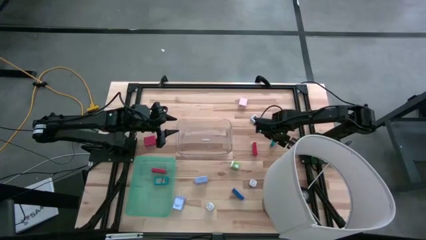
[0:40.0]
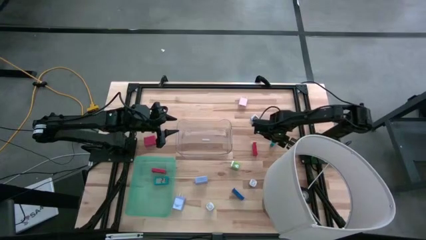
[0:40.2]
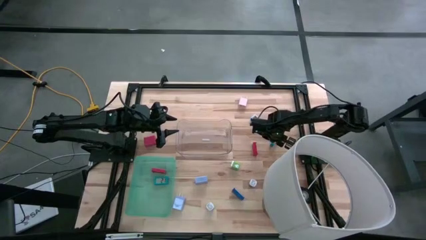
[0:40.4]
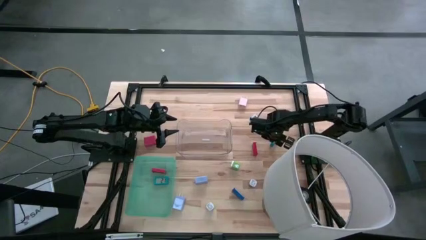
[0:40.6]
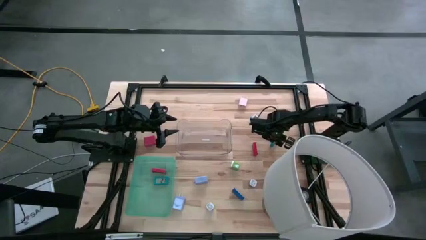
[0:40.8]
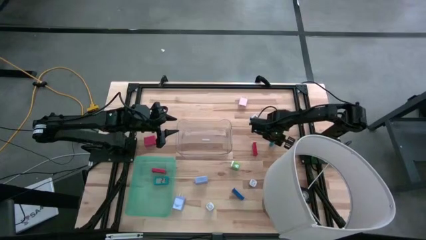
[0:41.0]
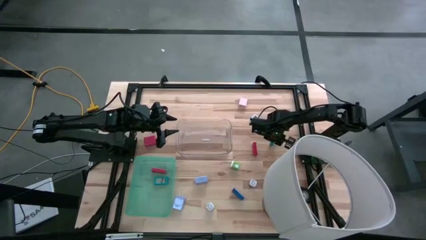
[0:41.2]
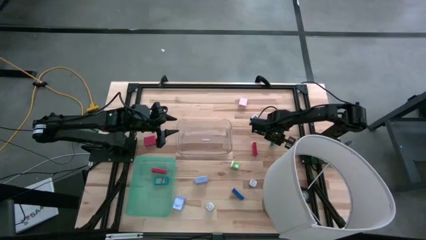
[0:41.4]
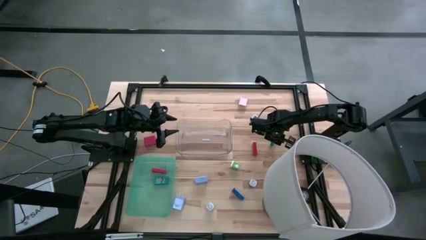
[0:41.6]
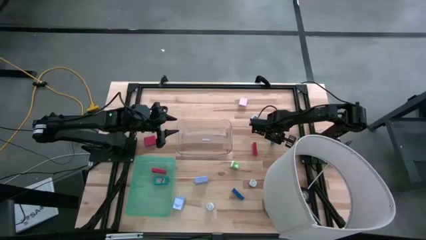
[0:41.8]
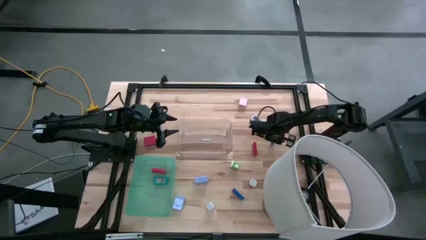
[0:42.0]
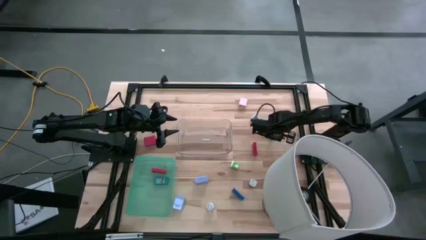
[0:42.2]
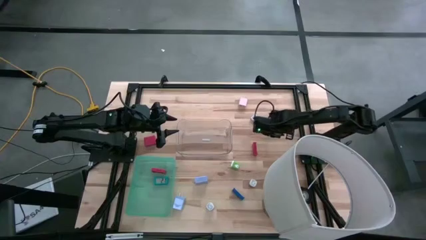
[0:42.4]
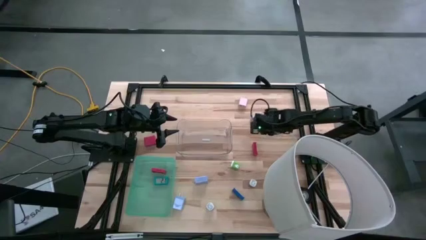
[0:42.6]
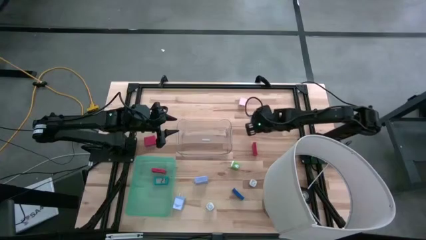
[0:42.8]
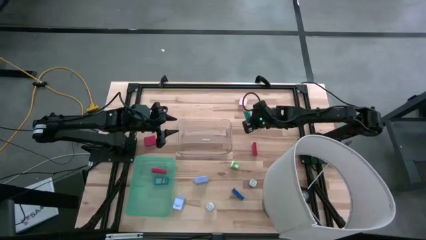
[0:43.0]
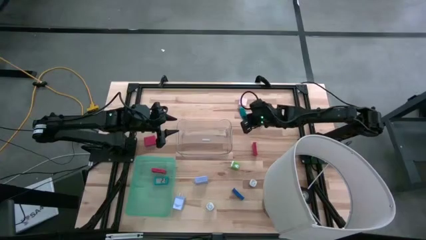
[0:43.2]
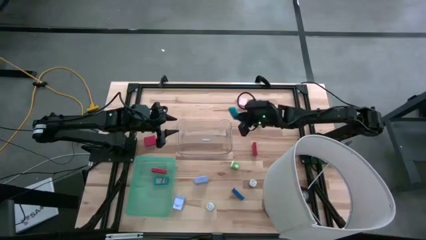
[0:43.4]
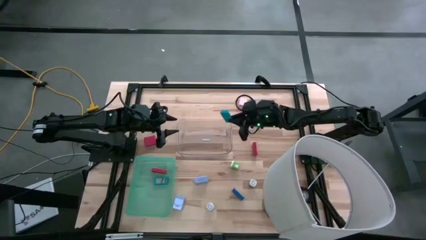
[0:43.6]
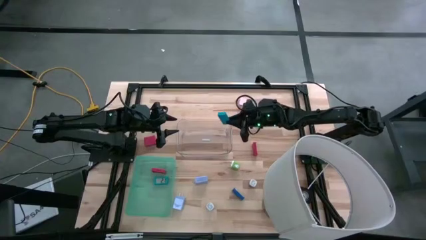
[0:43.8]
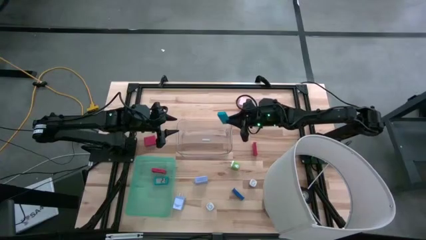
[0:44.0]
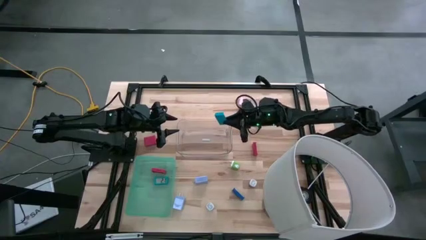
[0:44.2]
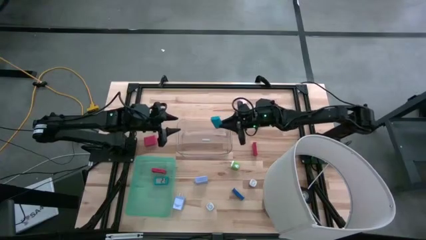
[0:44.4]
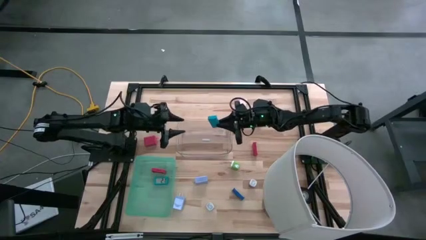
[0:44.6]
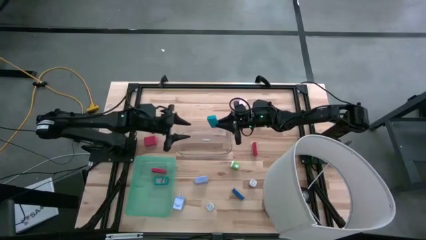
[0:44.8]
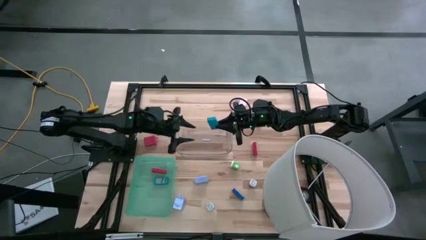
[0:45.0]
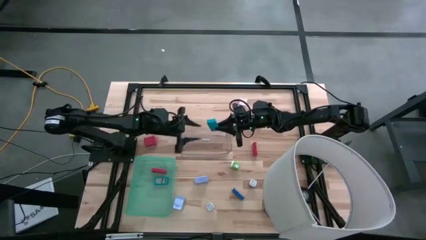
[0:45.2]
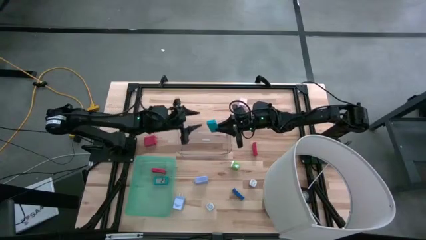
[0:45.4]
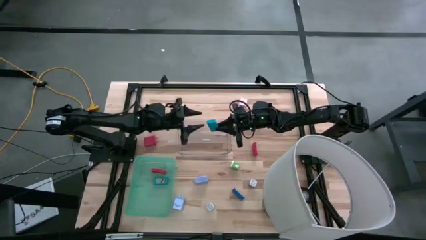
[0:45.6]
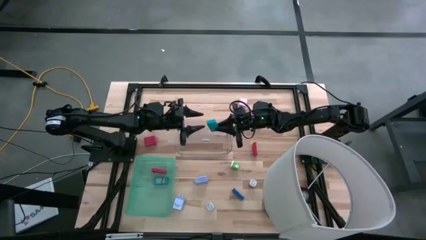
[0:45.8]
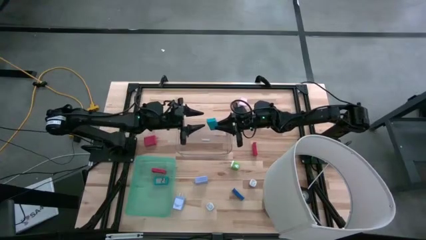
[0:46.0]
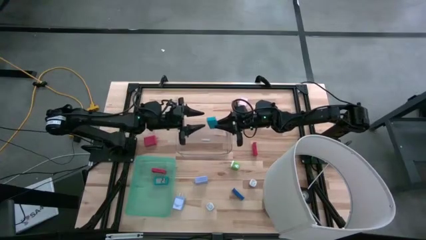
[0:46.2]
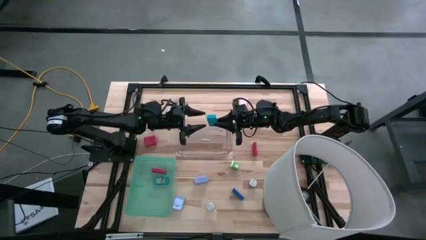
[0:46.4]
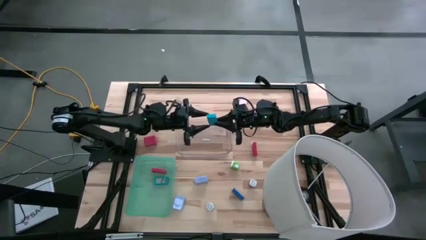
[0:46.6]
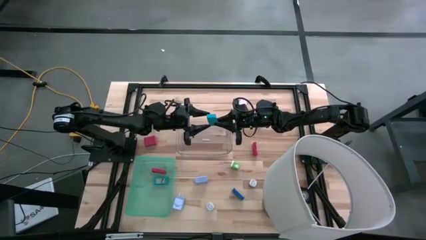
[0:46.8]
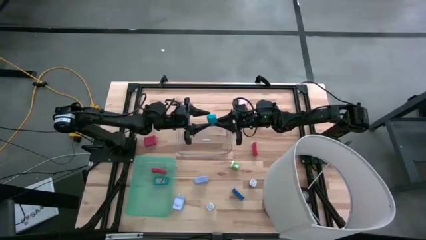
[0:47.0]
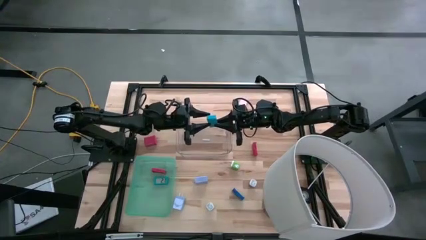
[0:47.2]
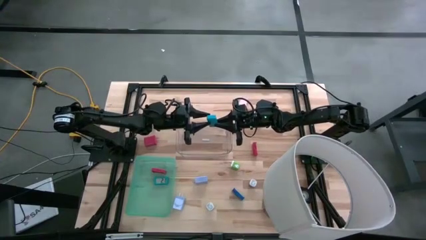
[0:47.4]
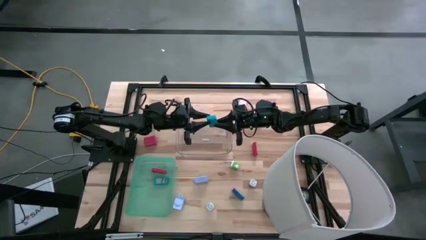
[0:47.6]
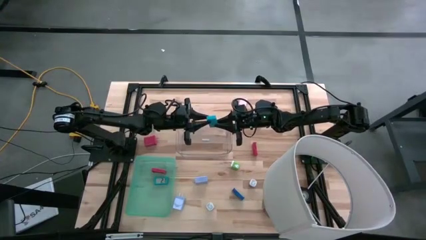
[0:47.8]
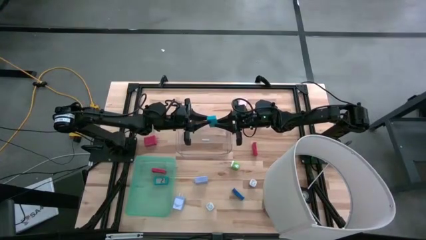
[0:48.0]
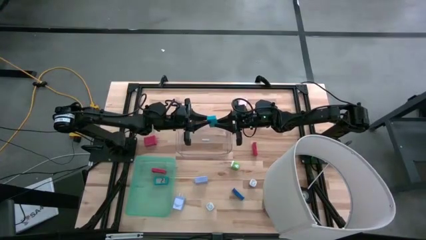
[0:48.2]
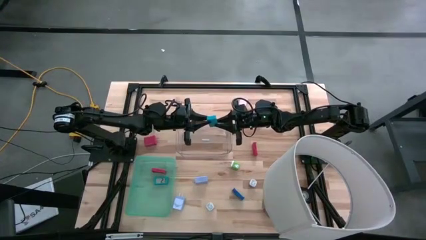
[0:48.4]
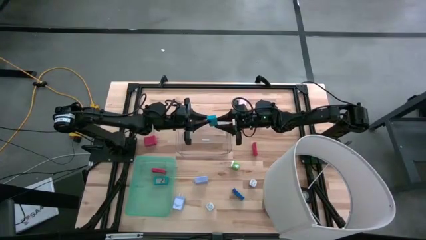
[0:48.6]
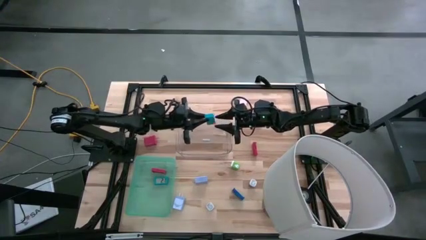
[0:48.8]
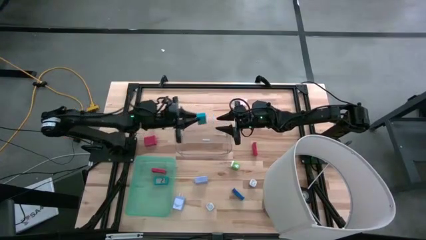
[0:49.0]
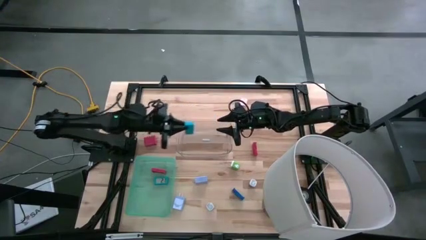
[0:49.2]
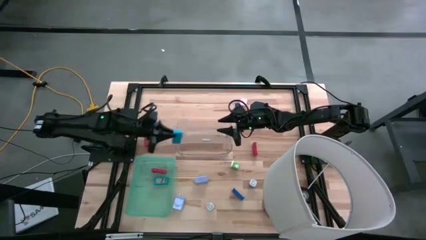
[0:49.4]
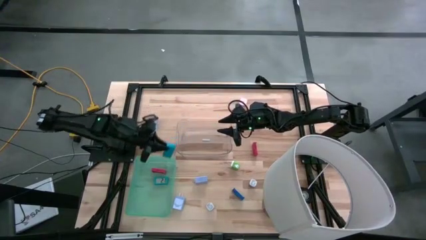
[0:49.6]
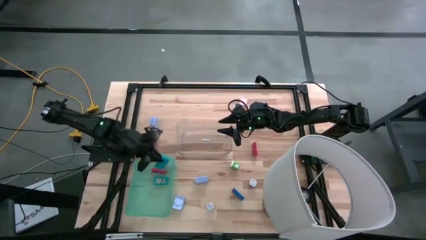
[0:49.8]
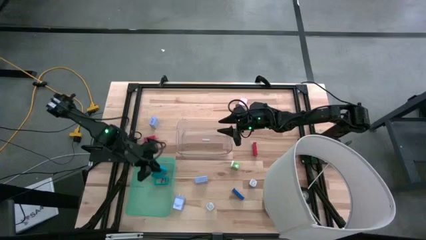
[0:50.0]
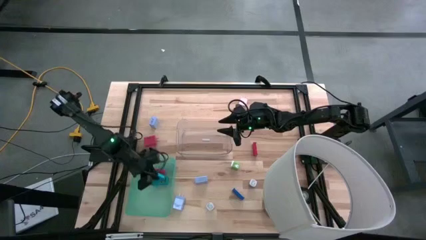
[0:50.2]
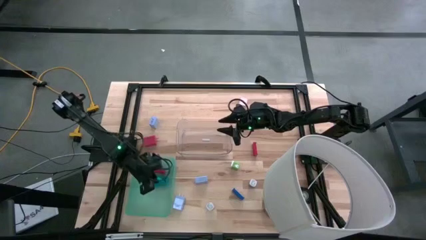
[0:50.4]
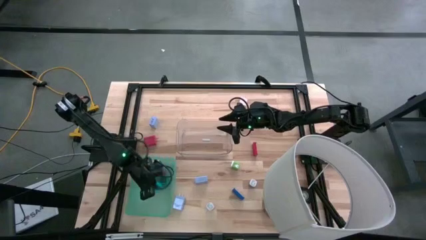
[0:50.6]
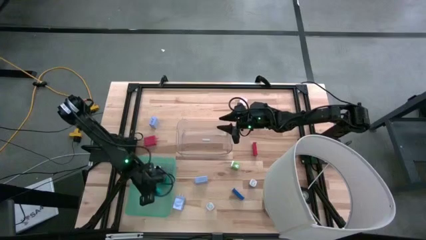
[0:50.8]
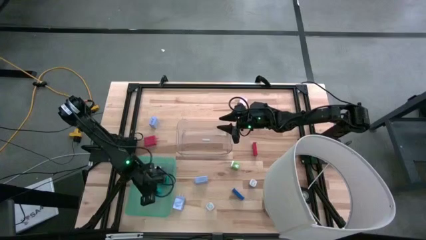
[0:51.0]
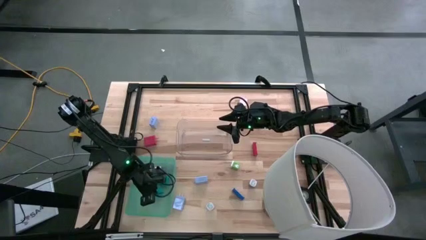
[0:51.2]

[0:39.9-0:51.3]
Task: Pick & Place Office items
Put the light blue digital clock into the green bin

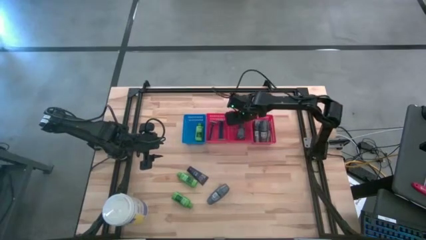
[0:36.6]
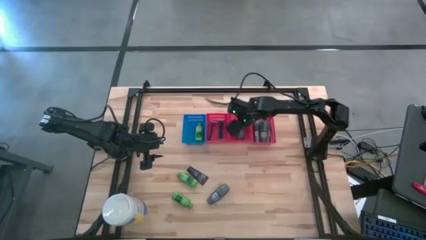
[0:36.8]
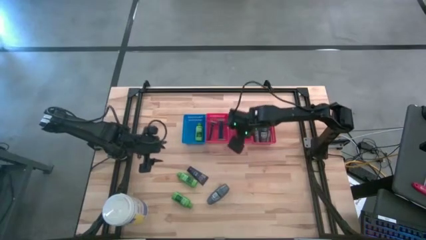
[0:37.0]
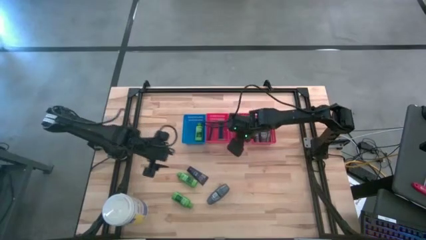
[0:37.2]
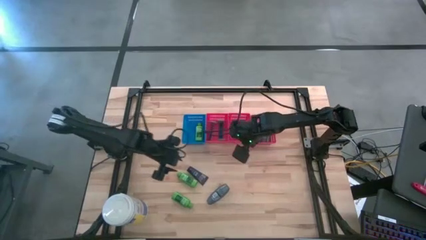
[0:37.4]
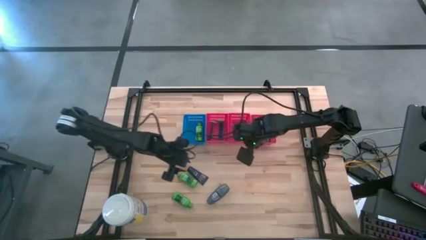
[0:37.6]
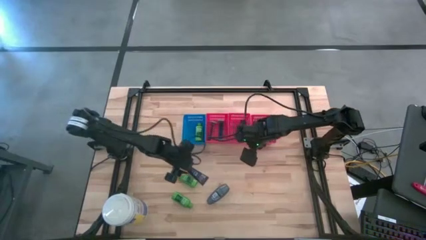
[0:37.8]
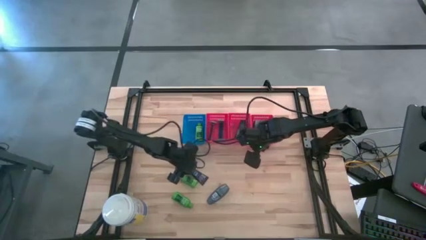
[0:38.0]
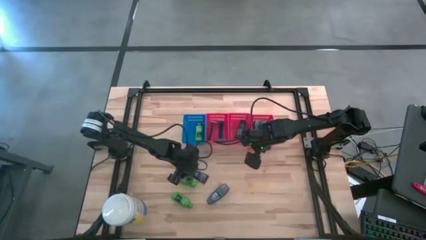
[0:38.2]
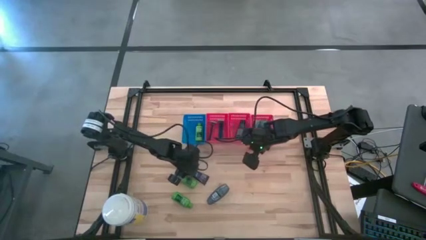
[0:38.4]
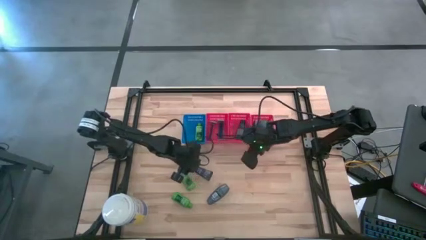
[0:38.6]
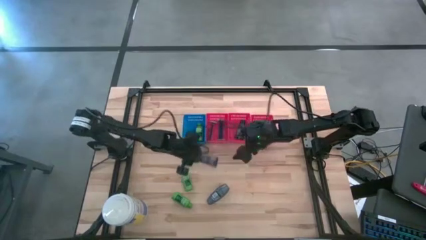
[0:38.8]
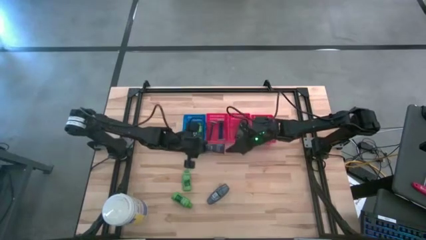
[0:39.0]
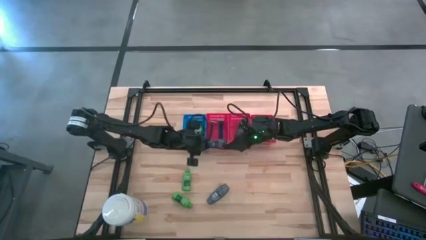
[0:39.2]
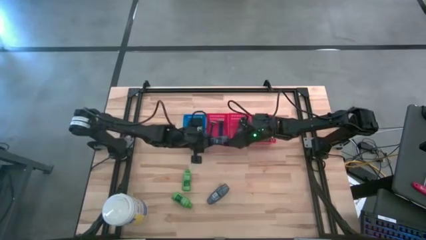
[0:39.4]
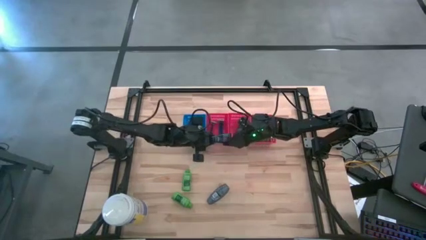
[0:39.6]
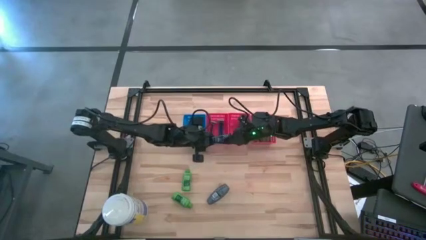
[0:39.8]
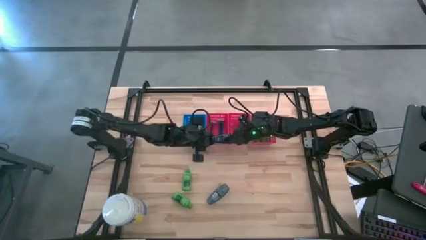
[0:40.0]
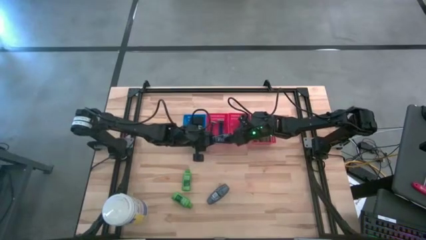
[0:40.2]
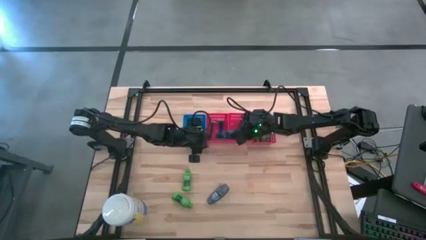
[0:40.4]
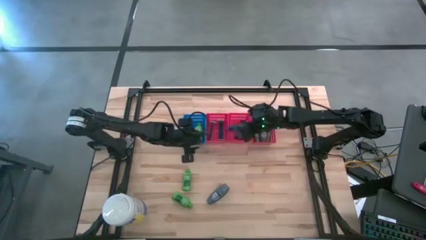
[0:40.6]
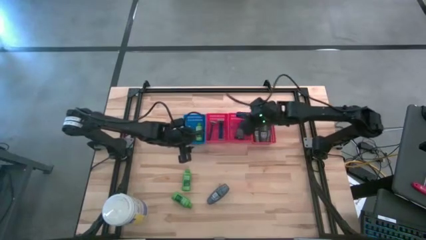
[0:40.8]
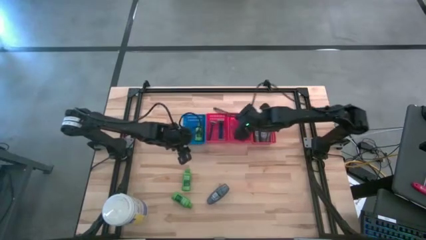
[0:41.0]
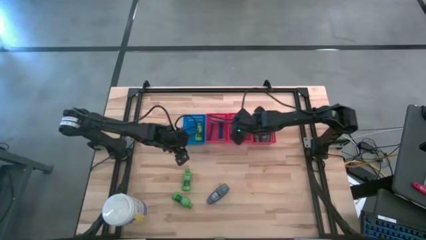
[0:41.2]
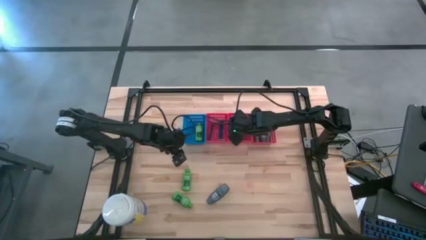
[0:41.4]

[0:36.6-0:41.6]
Task: Pick & Place Travel size toiletries
Put the black shave cream into the middle red bin

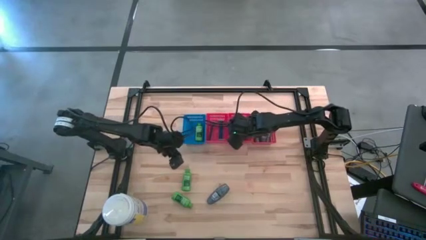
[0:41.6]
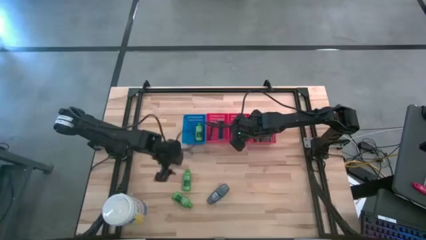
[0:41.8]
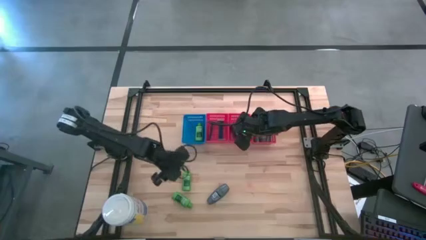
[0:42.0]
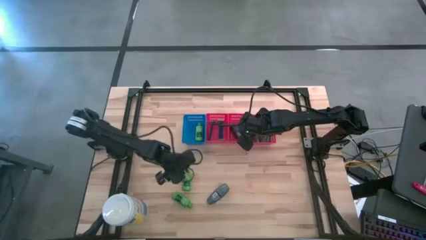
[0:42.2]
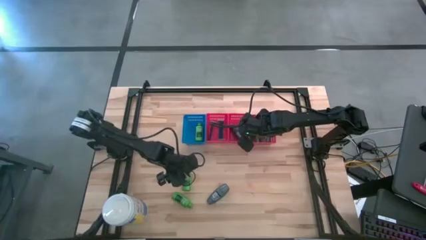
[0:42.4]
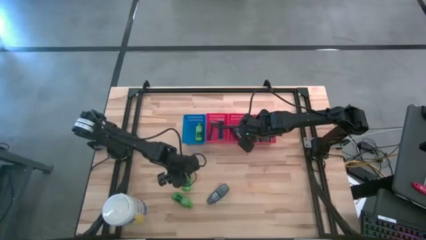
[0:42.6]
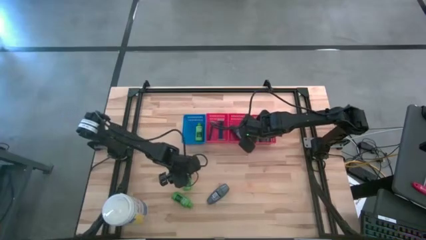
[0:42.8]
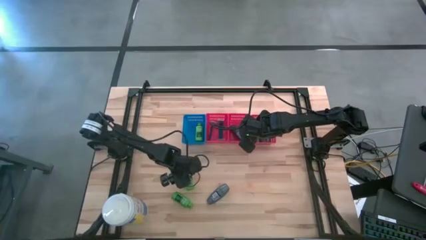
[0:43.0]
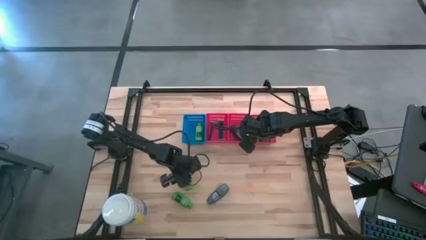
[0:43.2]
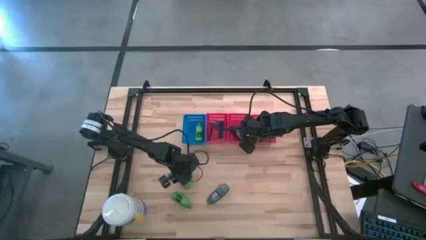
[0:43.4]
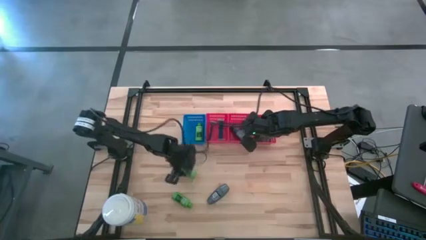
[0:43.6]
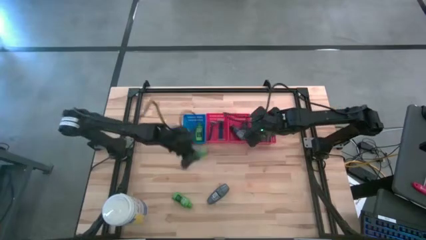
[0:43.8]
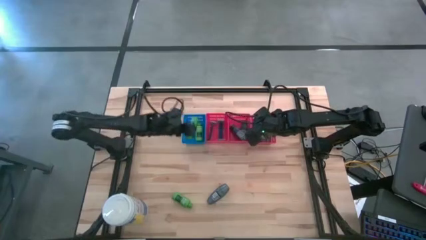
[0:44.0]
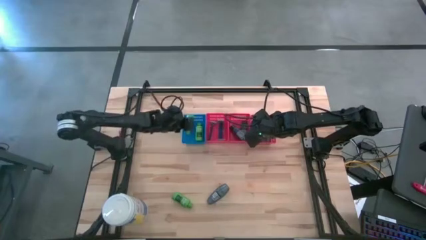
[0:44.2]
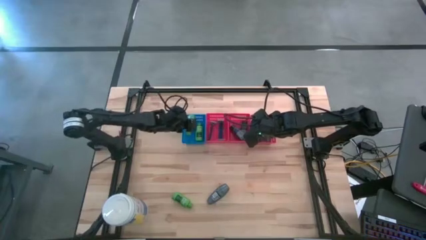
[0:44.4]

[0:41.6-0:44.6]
Put the green shampoo into the blue bin
